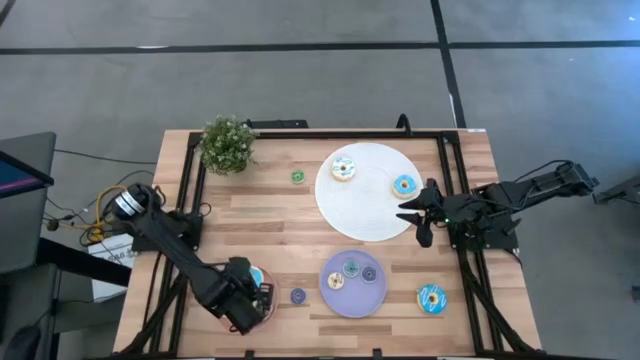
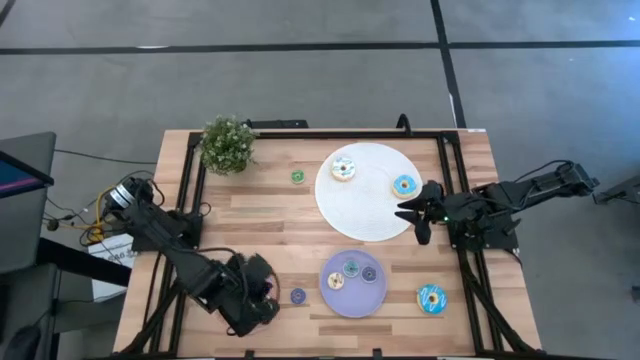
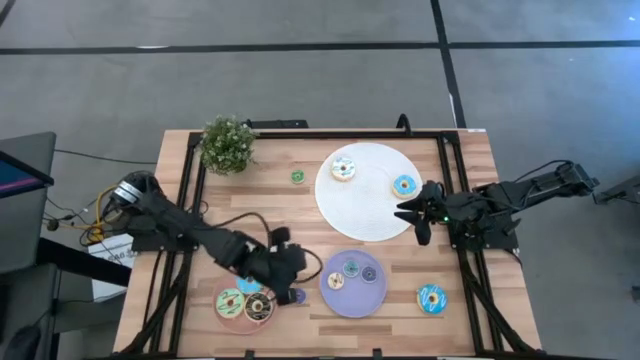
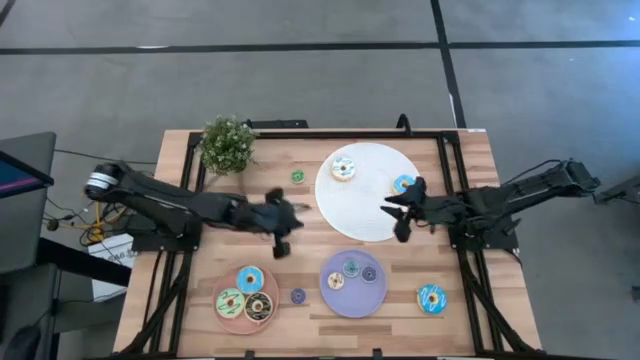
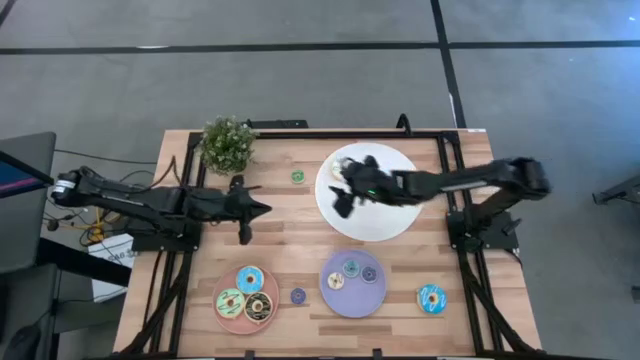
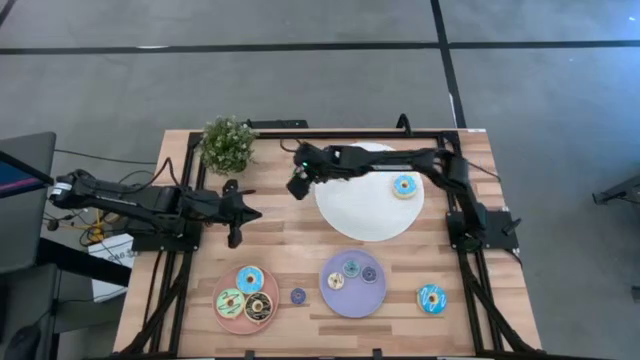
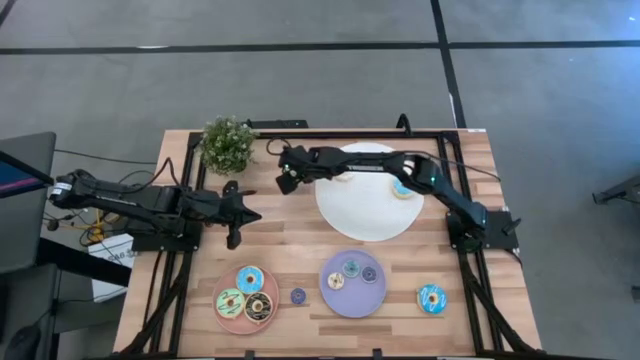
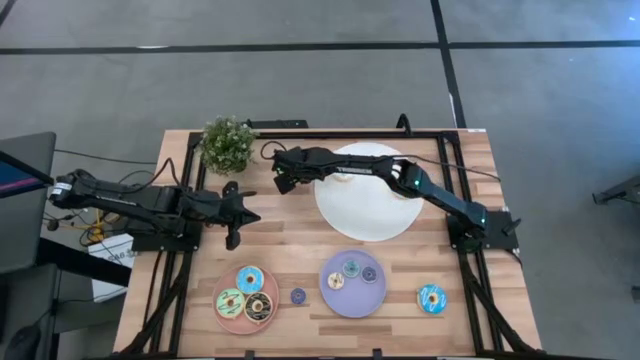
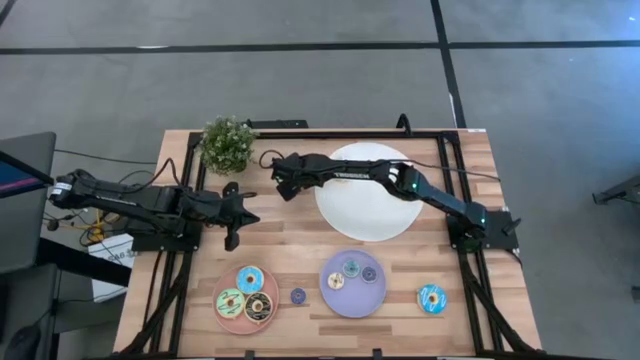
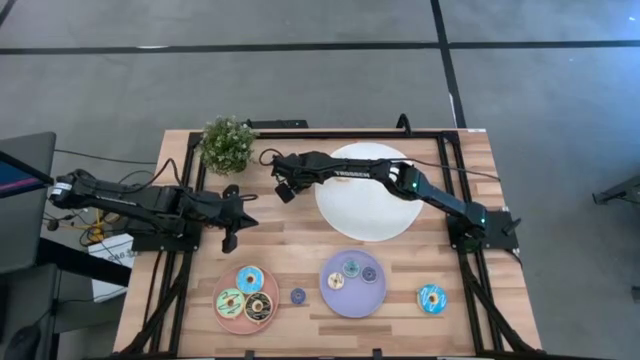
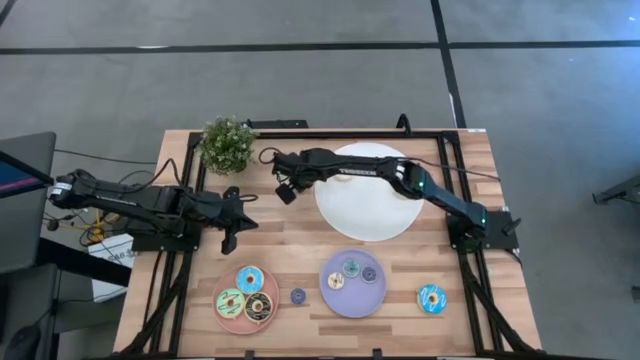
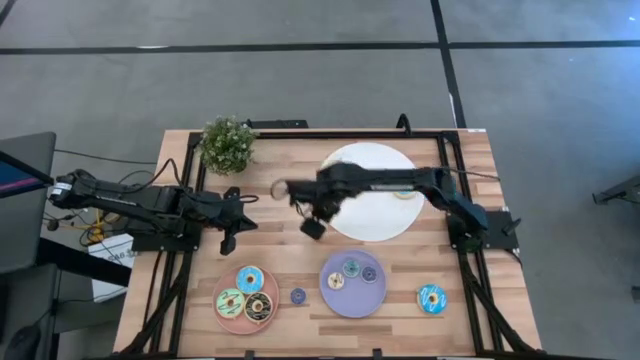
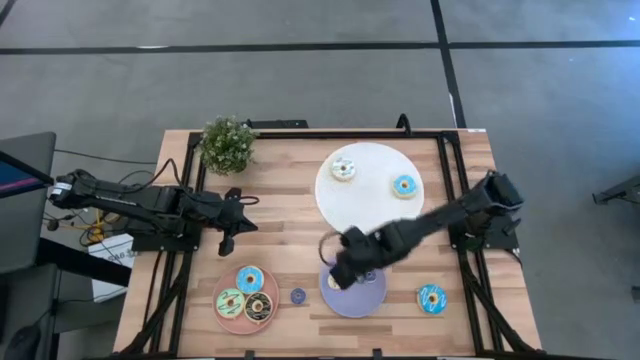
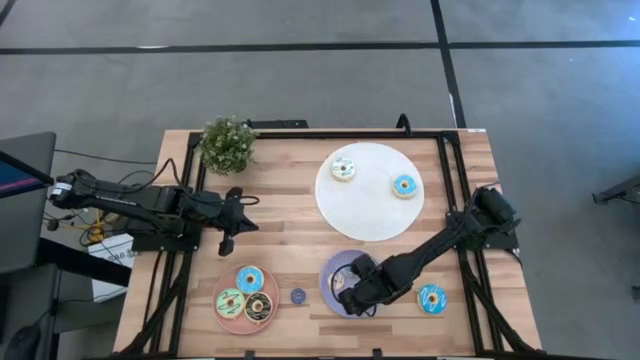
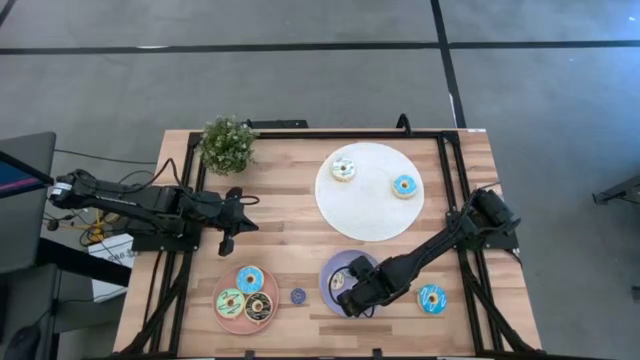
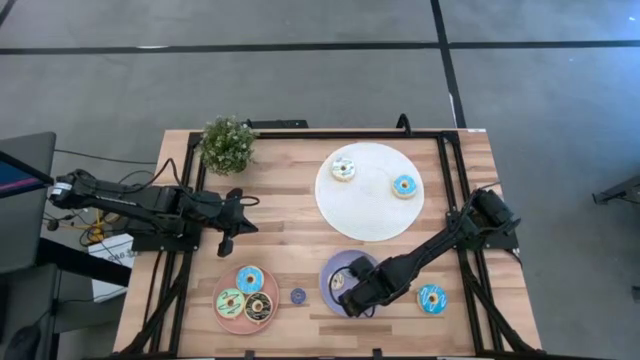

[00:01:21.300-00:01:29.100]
Task: Pick & Place donuts
Put the small green donut on the purple plate

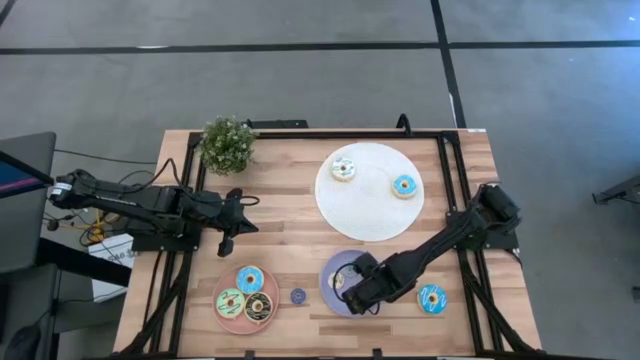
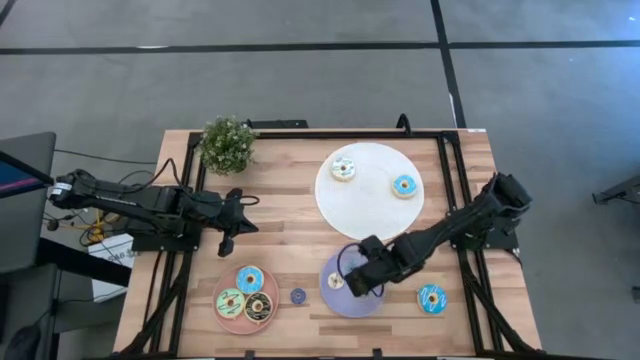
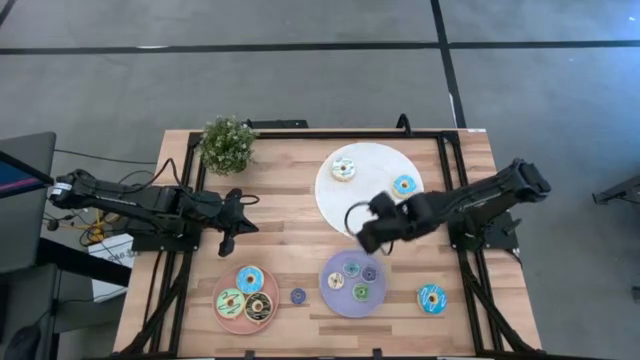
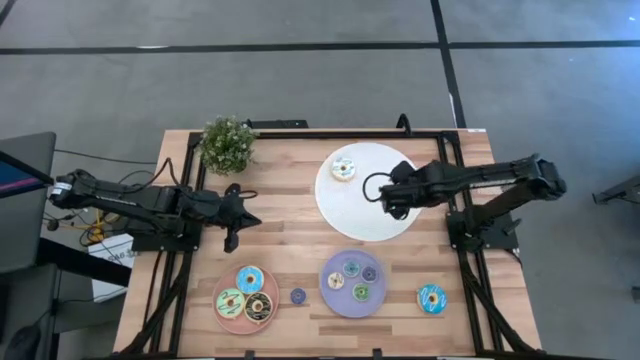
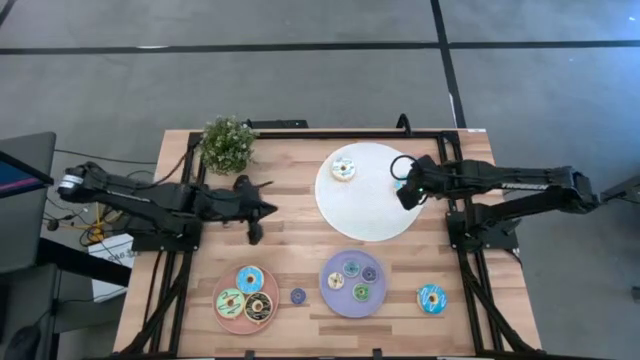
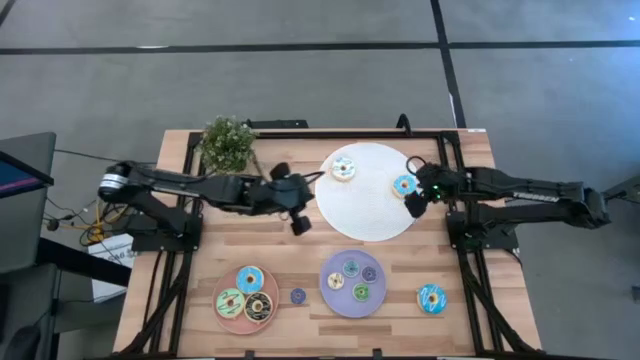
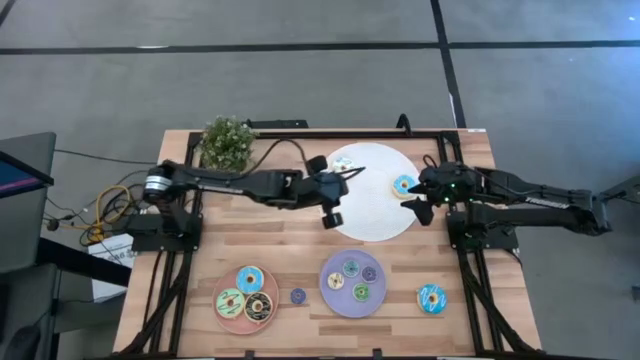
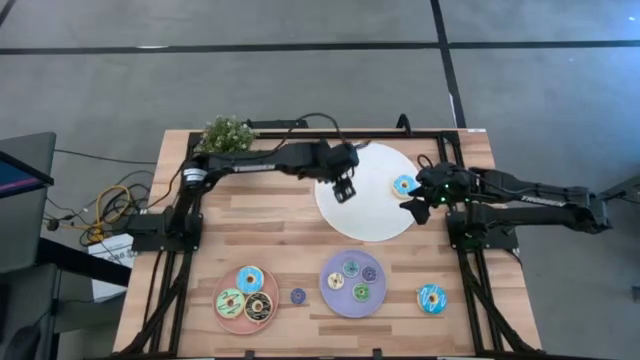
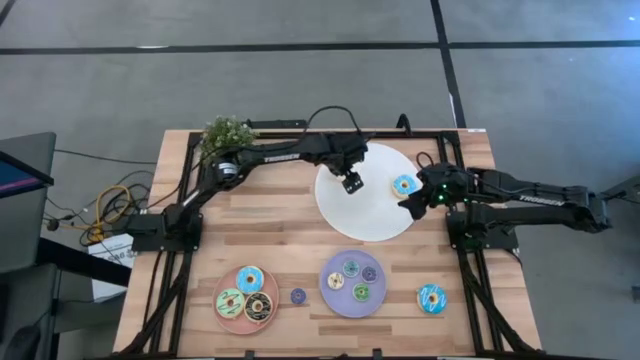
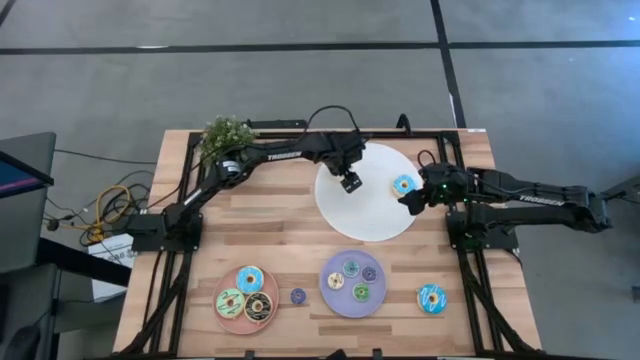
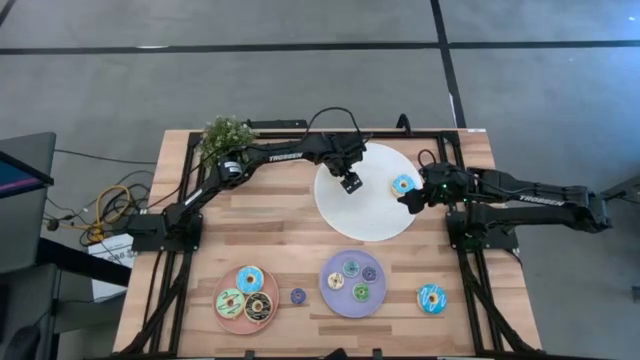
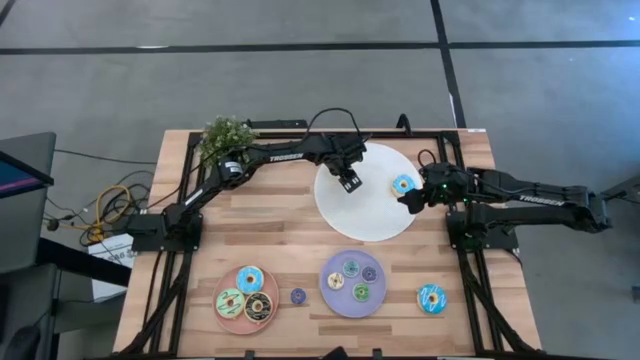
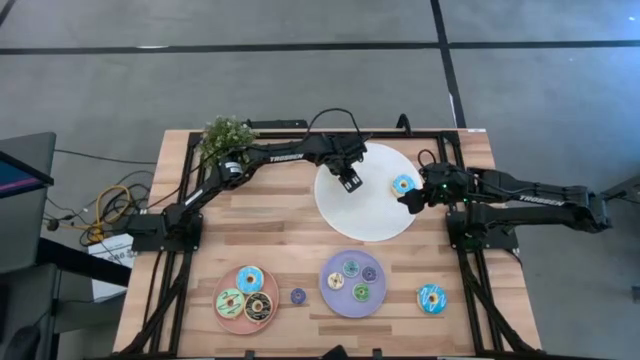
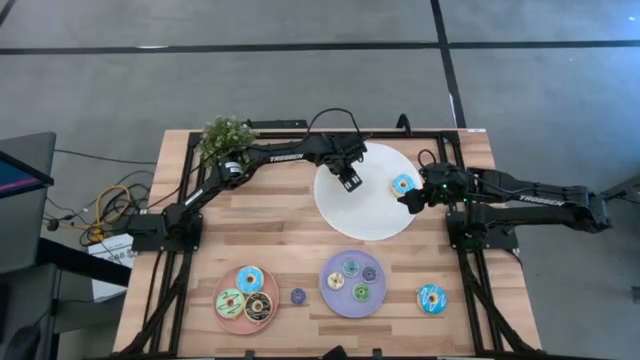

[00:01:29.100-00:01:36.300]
Put the big white donut on the pink plate

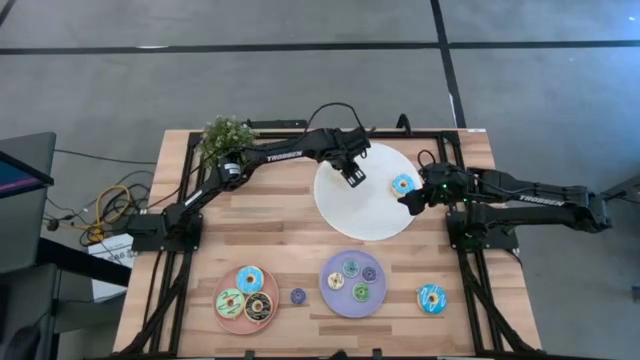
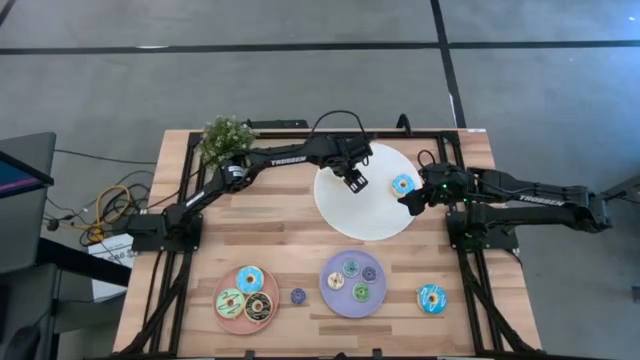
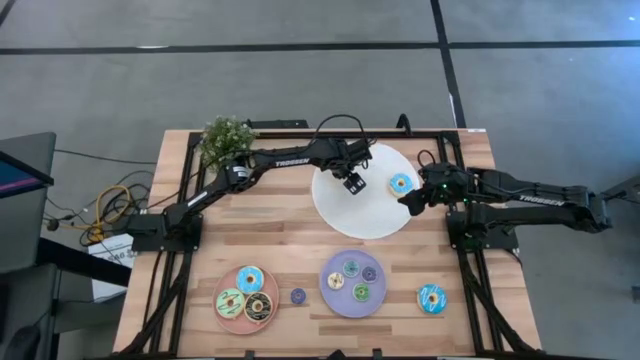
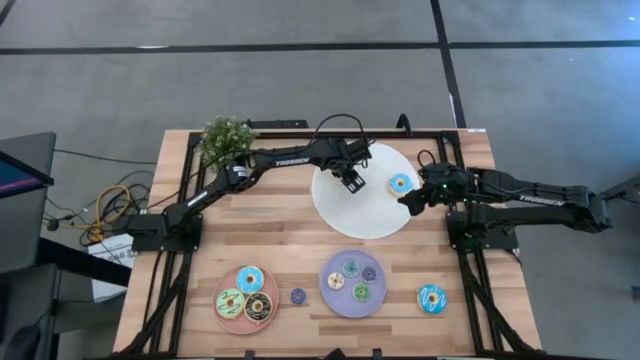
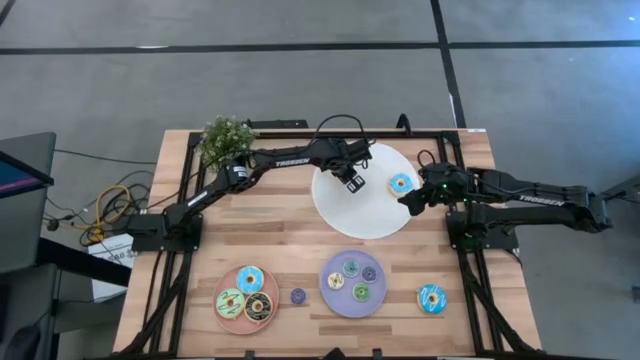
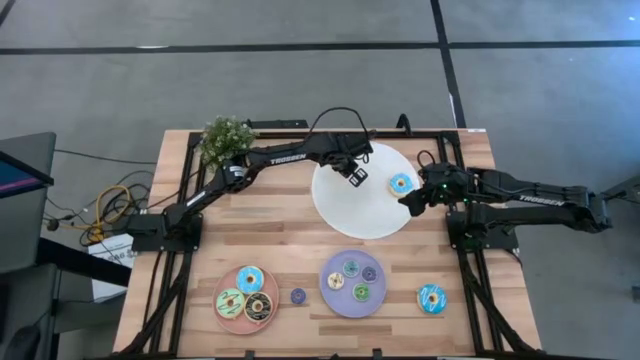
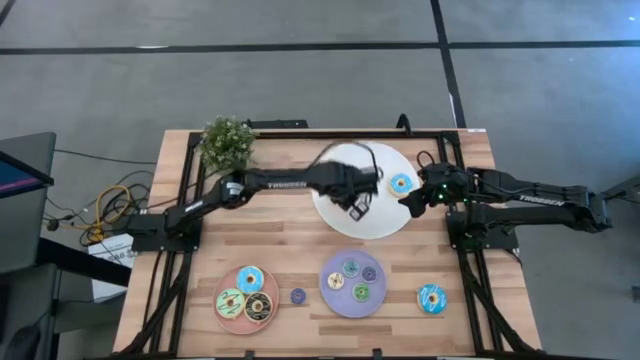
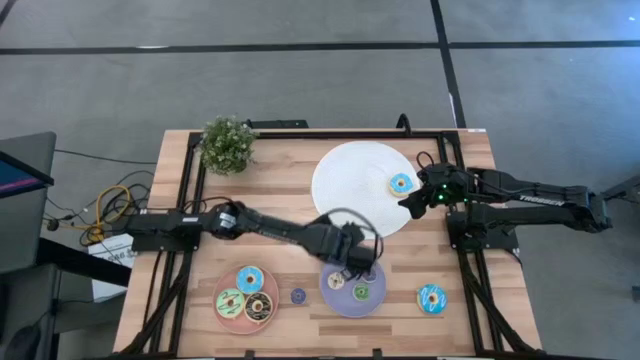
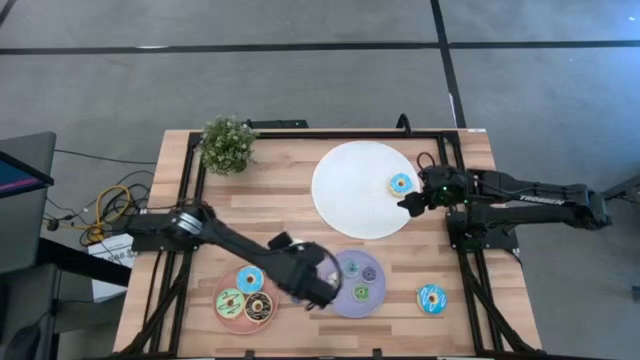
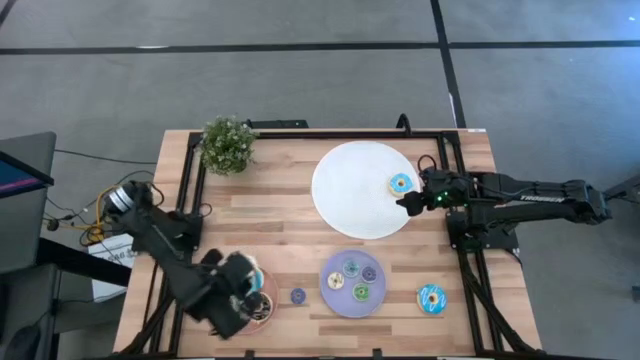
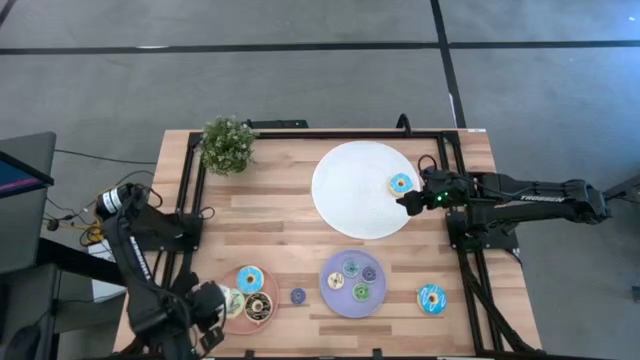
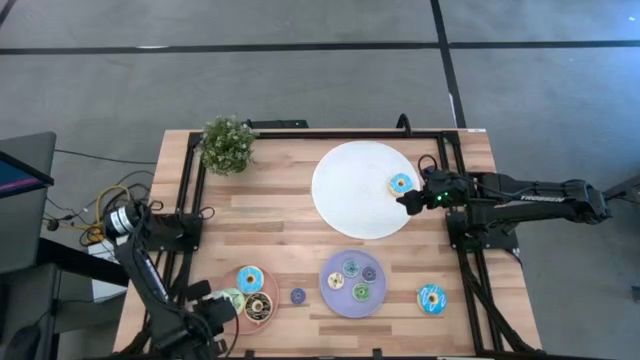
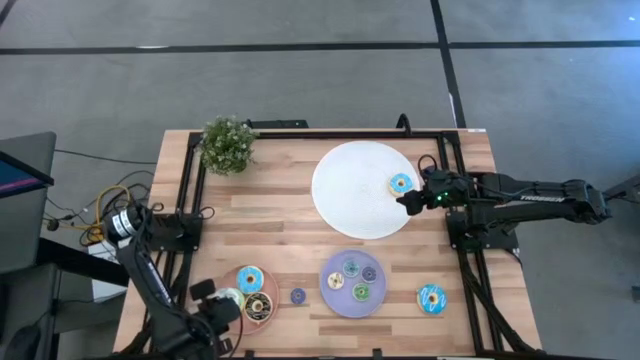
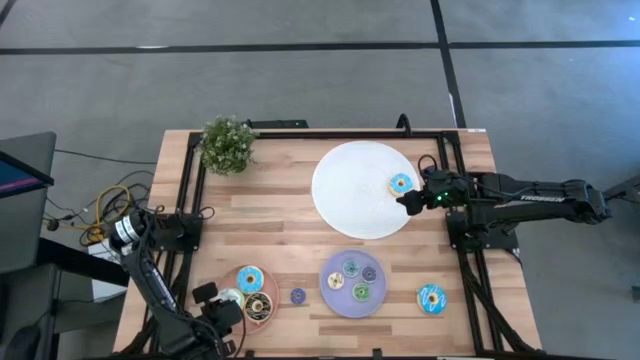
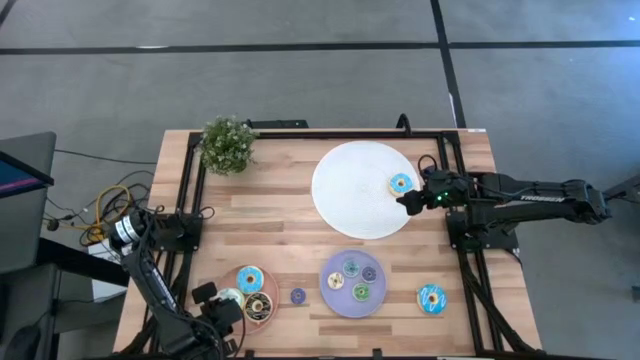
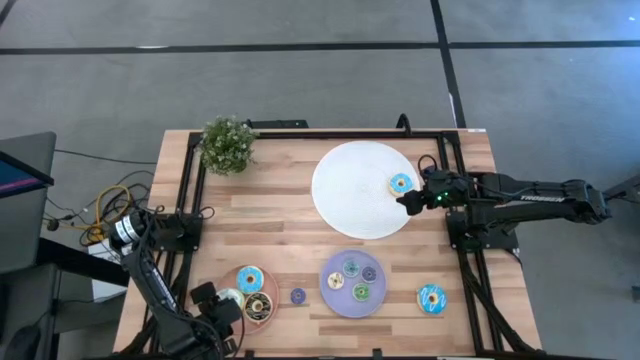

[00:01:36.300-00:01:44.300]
Put the big white donut on the pink plate
